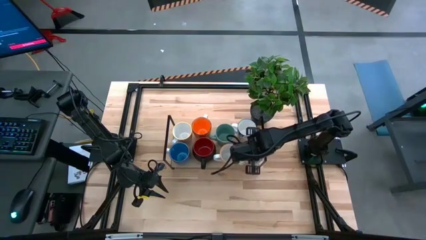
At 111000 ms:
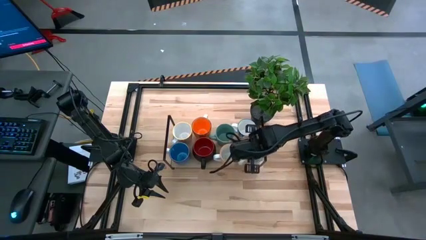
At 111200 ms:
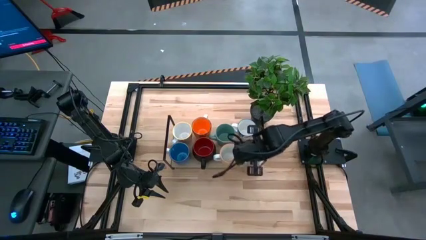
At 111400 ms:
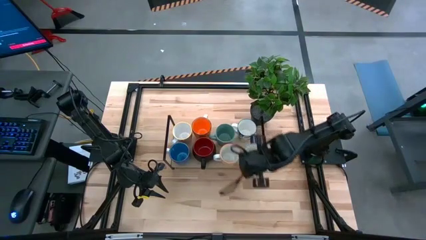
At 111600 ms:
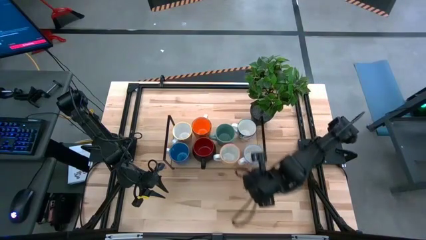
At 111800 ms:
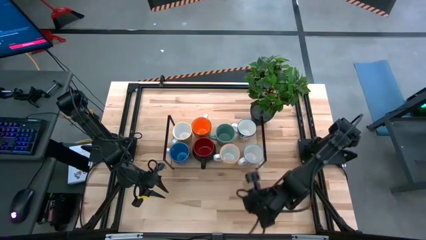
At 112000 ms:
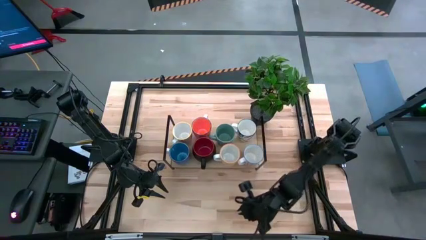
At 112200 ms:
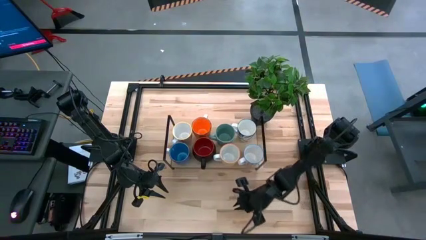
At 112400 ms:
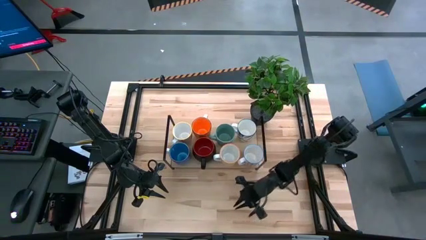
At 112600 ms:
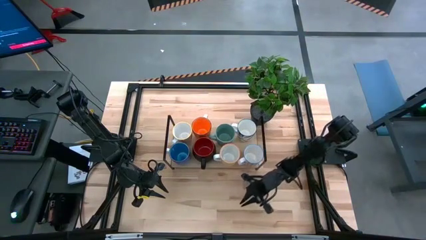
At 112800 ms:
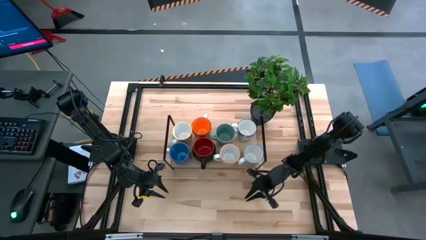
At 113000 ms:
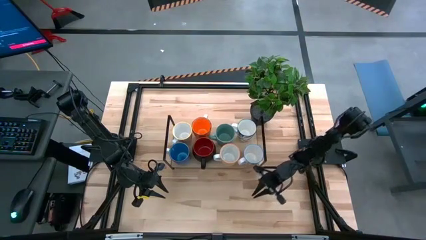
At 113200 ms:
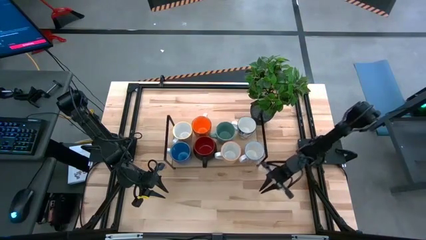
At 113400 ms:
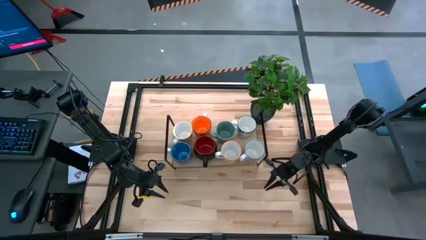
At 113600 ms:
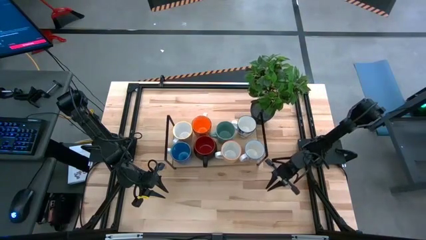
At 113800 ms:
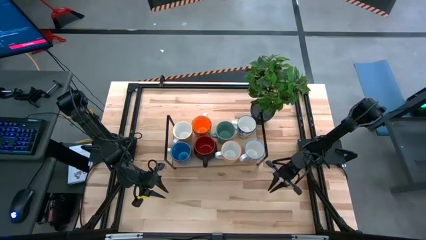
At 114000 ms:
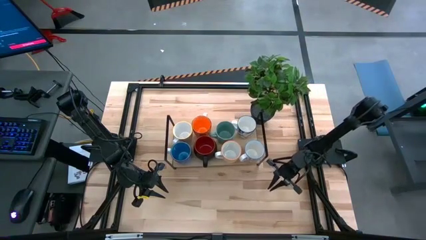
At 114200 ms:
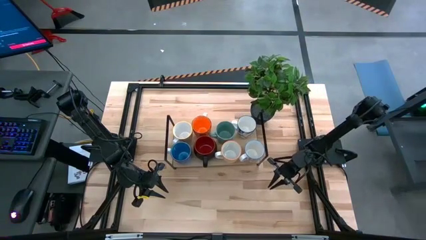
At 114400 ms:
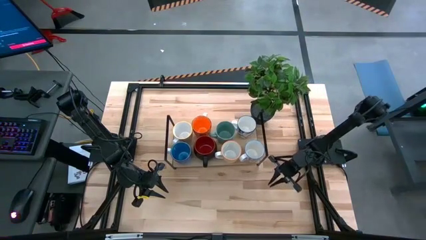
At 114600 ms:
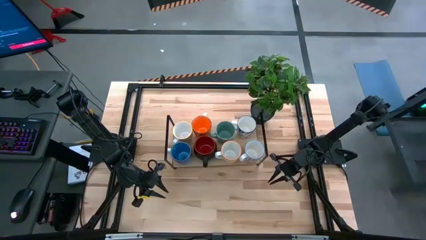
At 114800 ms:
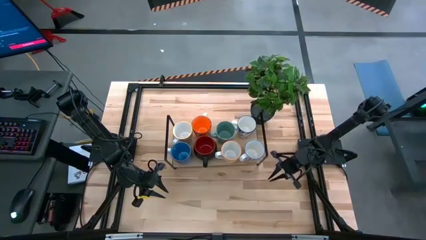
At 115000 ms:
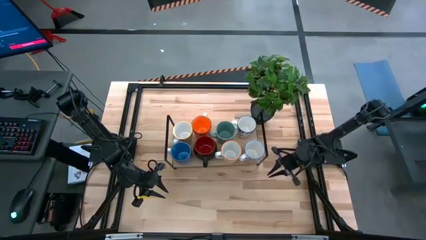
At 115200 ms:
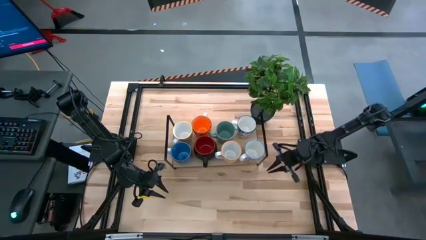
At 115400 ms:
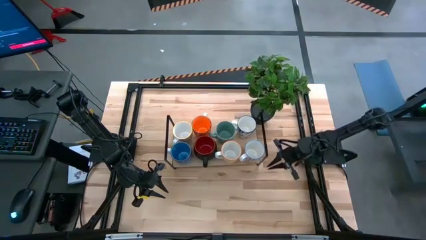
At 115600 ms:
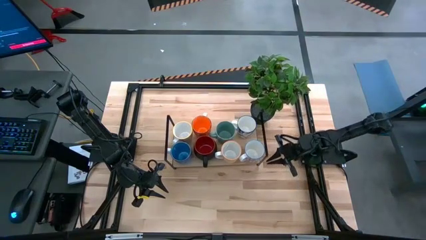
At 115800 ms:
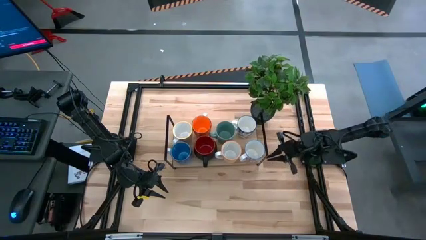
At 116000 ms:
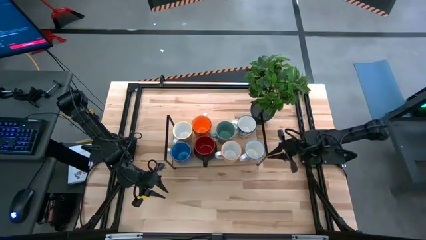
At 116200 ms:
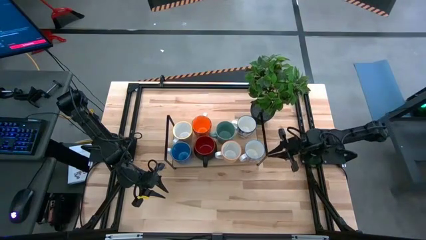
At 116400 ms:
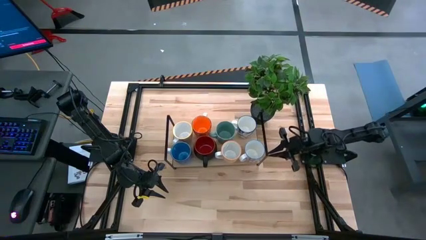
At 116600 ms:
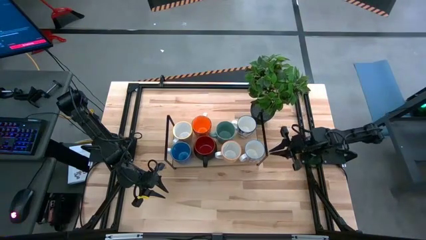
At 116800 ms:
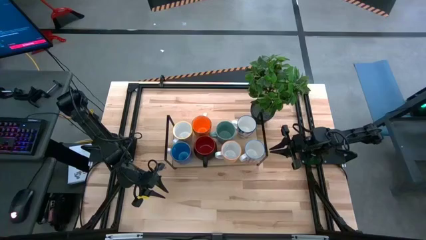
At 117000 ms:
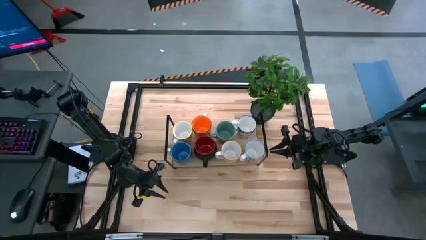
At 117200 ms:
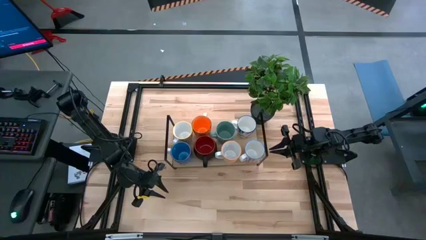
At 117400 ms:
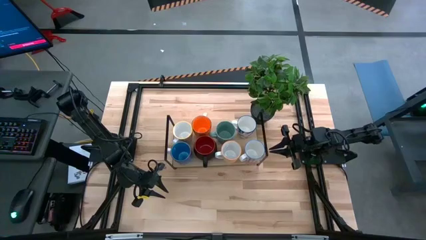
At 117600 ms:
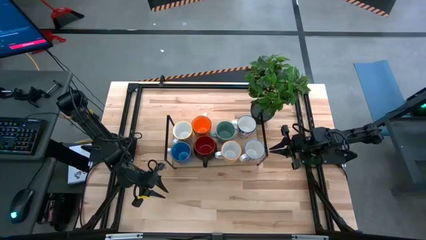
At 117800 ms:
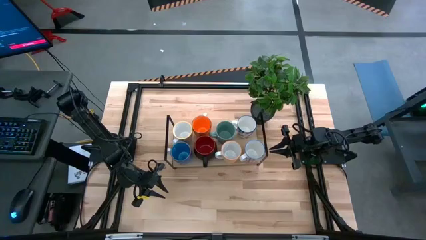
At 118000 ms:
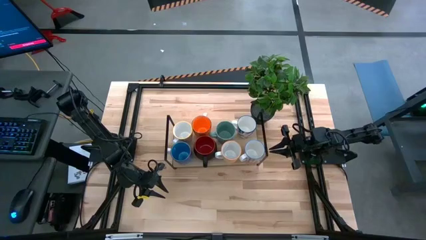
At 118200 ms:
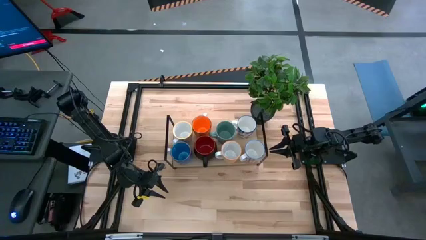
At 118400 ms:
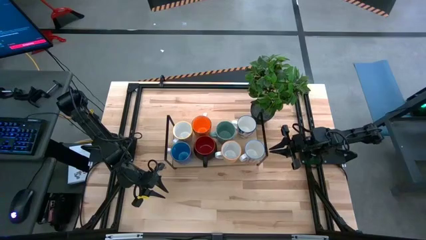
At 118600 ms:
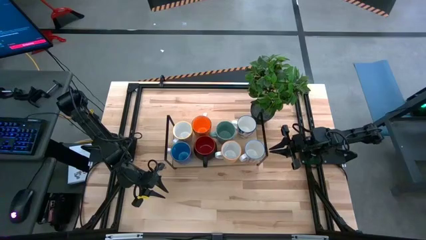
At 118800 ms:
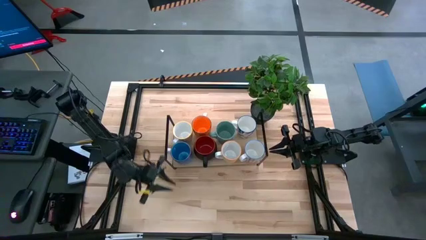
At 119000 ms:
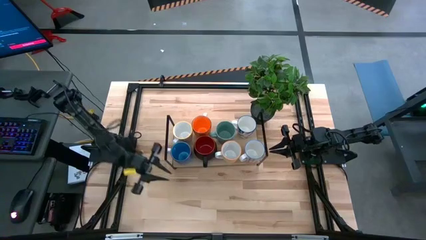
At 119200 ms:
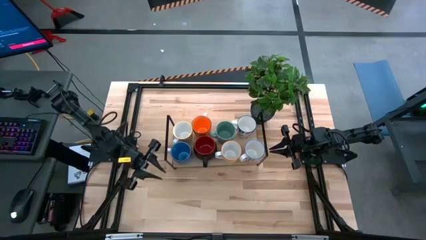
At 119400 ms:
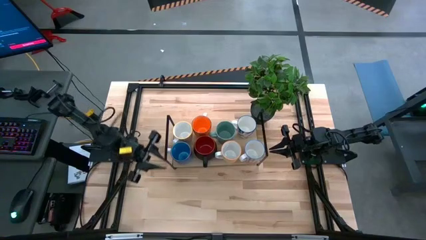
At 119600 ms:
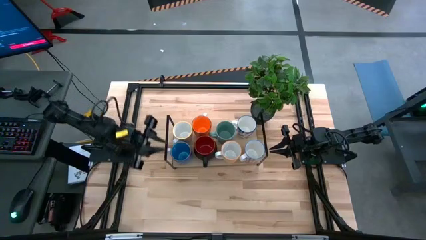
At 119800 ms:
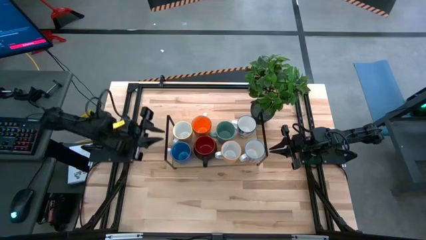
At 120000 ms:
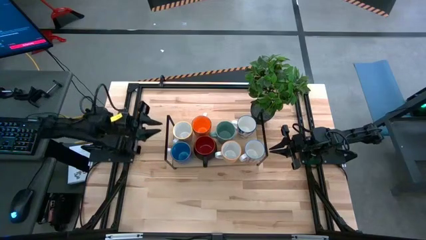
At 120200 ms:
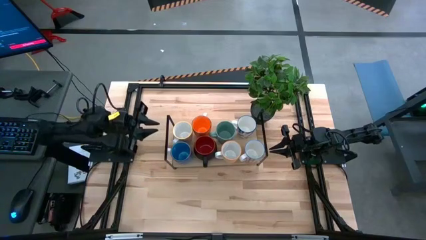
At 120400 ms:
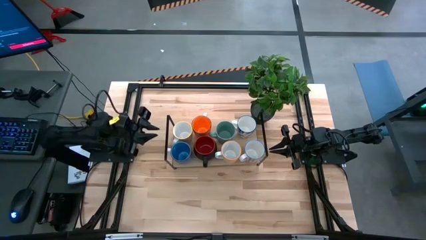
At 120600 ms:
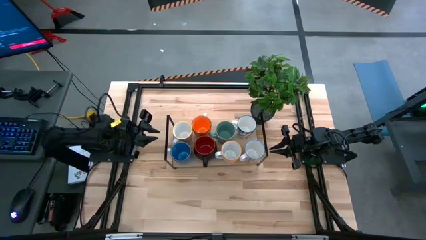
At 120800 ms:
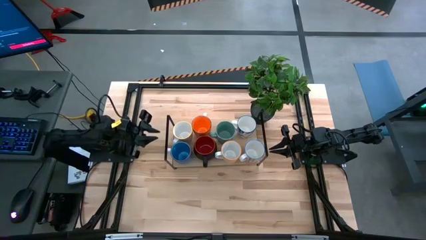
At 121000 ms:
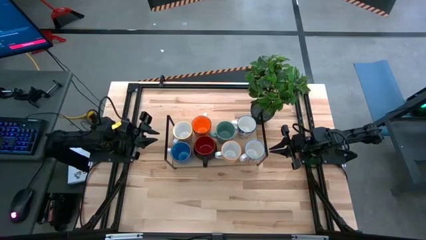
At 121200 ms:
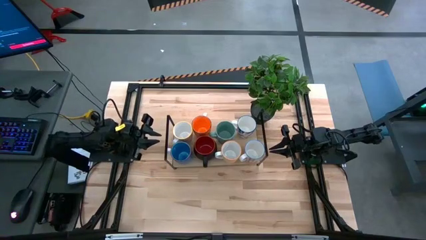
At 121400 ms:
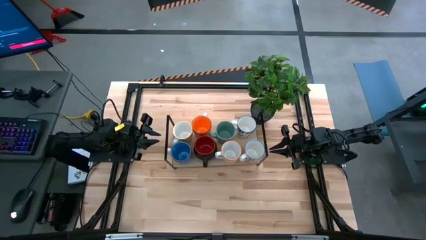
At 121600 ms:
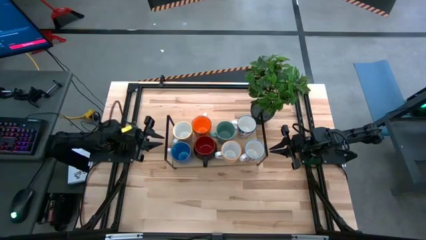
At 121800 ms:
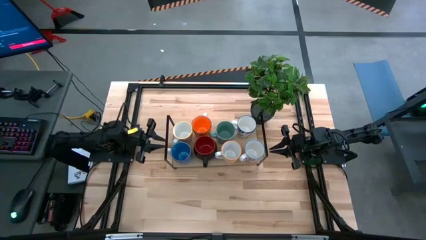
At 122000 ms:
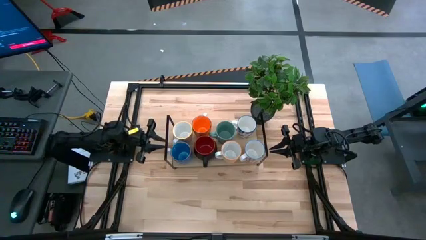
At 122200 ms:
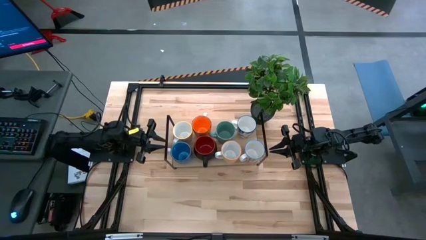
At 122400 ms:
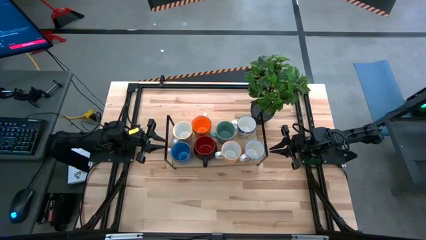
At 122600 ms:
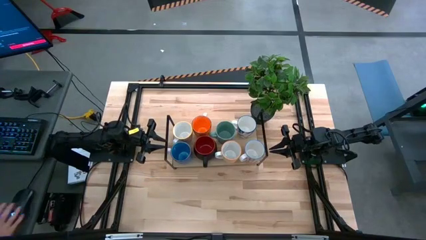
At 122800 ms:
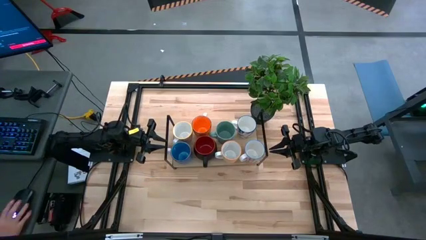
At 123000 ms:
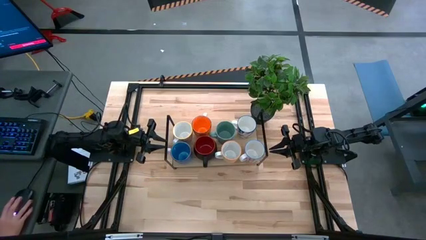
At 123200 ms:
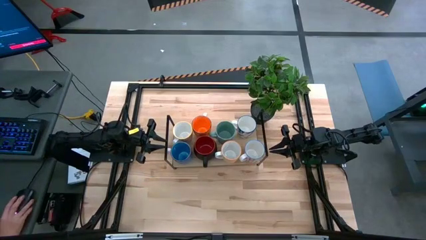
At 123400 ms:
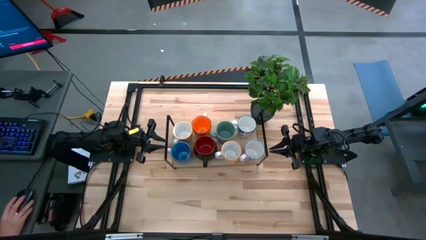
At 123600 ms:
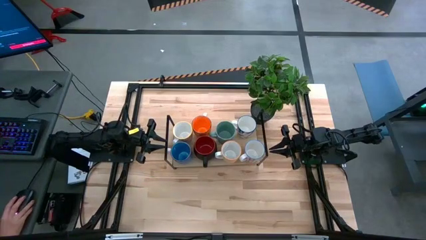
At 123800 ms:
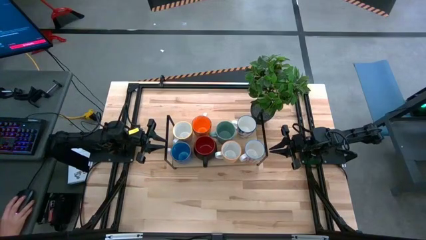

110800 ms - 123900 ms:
Task: Place coffee mugs
Return to Home Position
